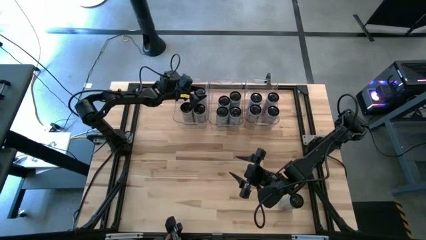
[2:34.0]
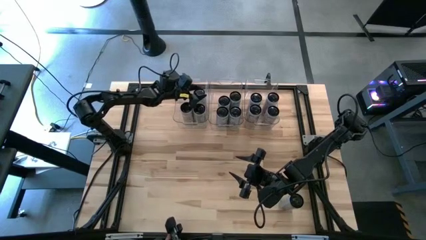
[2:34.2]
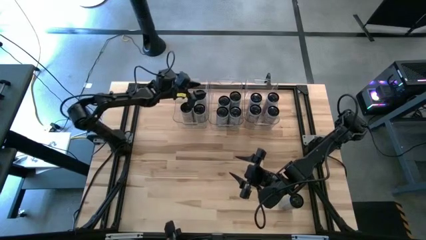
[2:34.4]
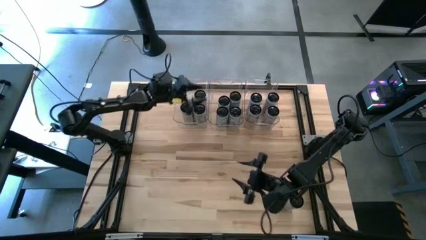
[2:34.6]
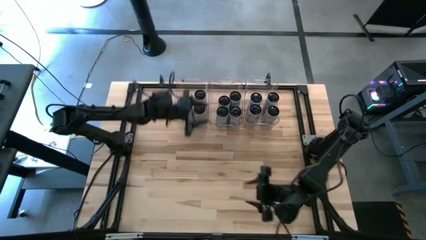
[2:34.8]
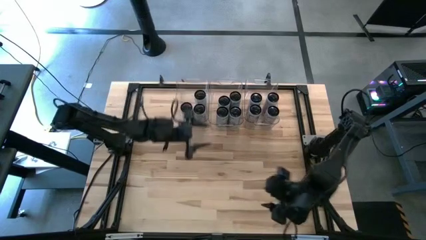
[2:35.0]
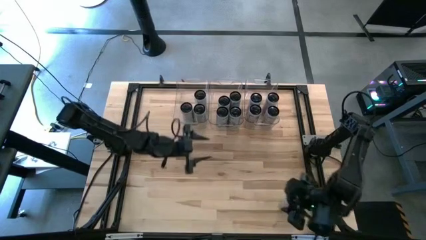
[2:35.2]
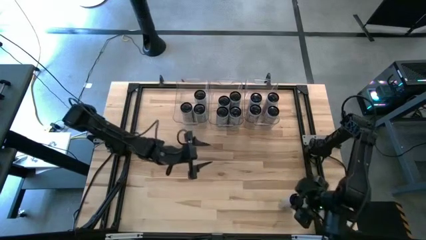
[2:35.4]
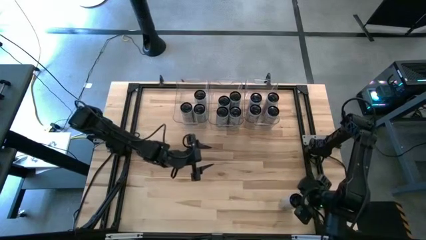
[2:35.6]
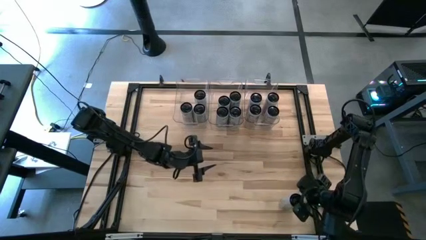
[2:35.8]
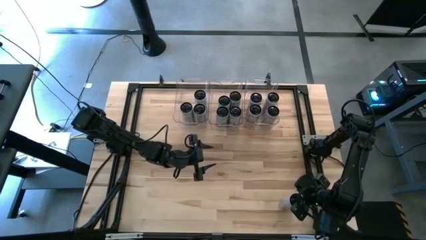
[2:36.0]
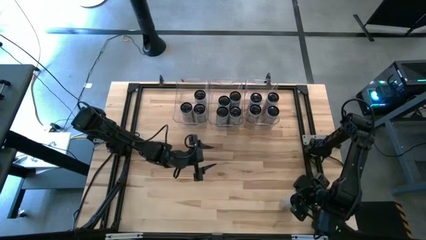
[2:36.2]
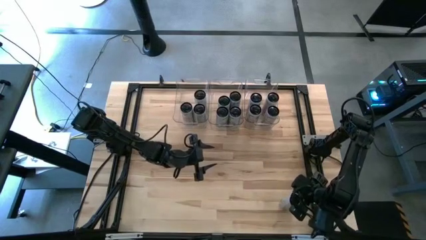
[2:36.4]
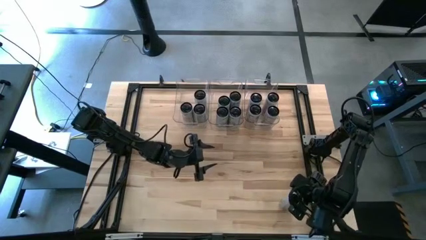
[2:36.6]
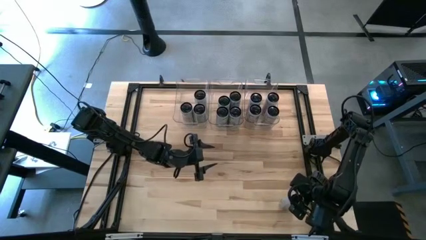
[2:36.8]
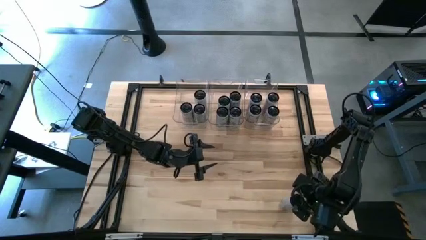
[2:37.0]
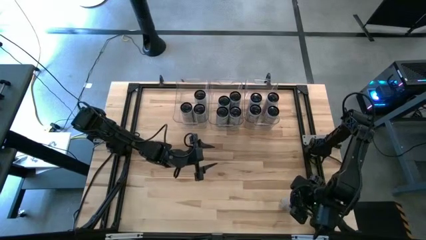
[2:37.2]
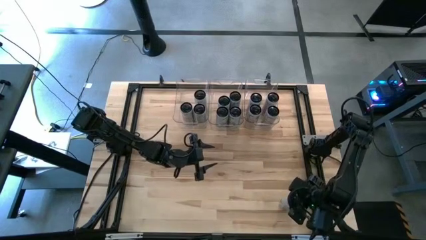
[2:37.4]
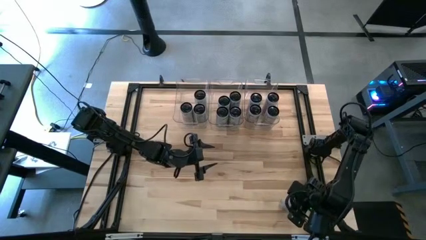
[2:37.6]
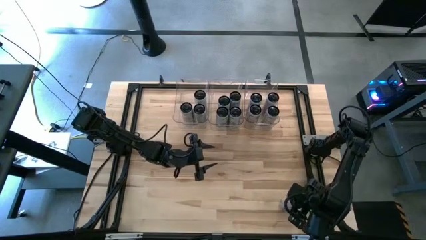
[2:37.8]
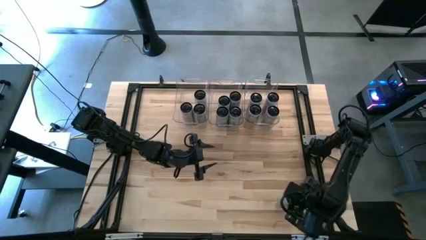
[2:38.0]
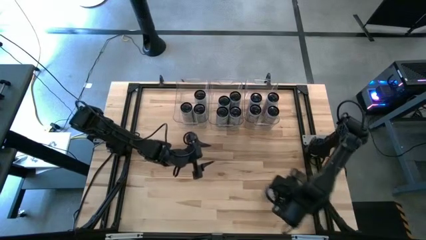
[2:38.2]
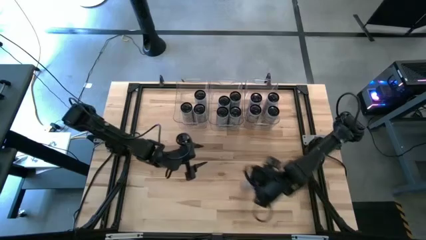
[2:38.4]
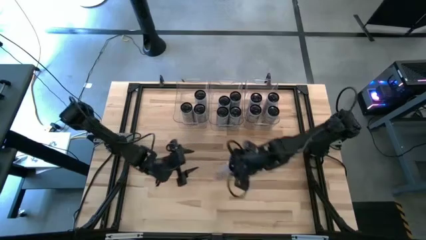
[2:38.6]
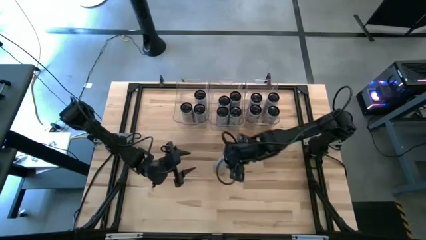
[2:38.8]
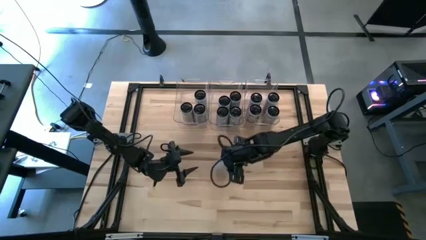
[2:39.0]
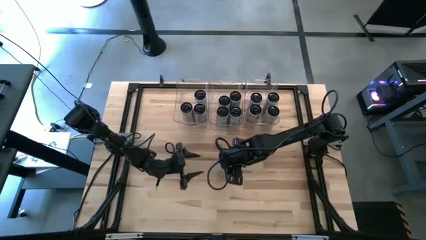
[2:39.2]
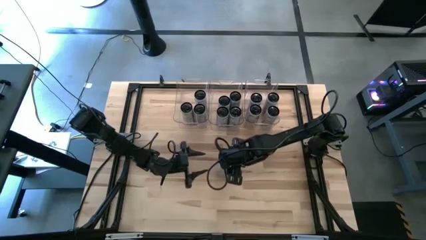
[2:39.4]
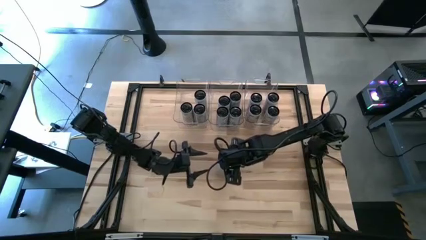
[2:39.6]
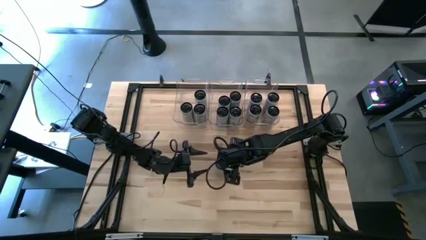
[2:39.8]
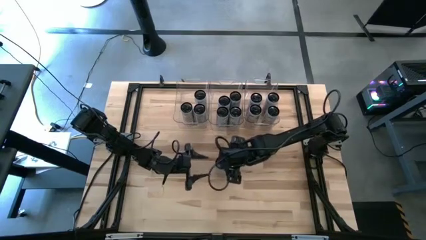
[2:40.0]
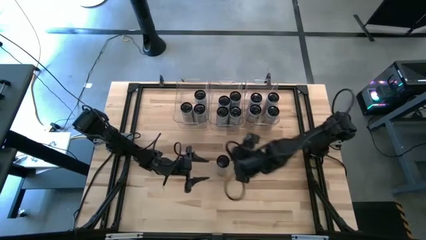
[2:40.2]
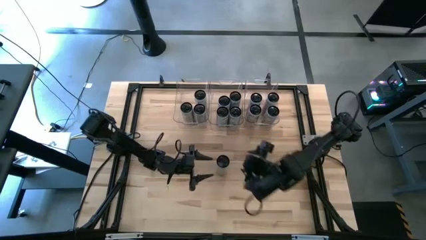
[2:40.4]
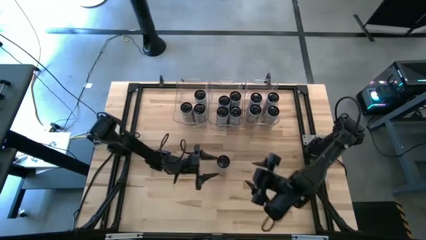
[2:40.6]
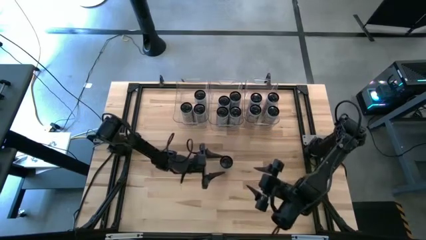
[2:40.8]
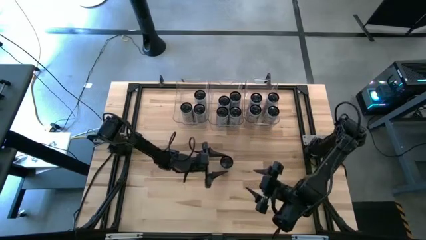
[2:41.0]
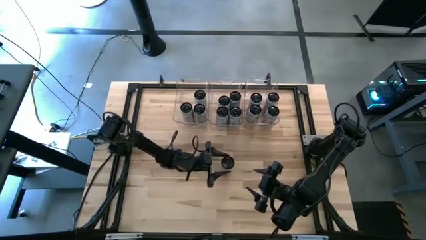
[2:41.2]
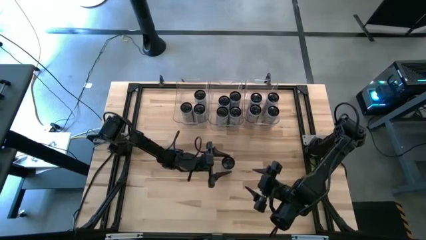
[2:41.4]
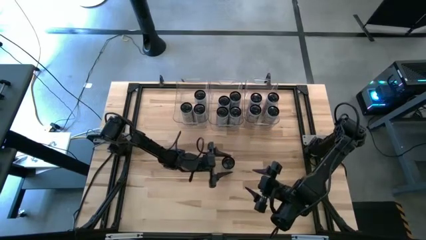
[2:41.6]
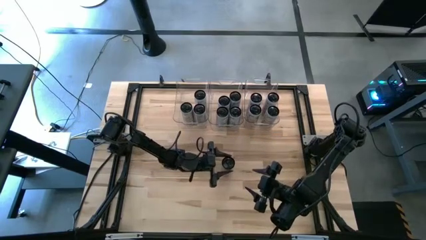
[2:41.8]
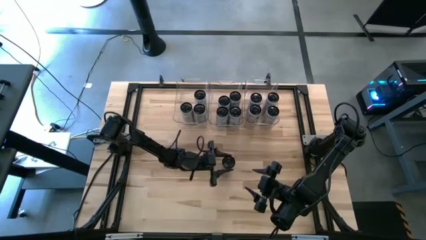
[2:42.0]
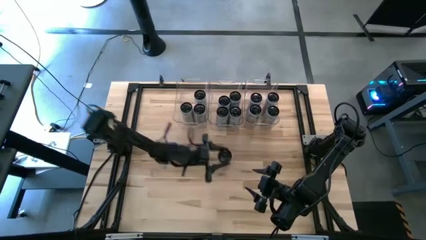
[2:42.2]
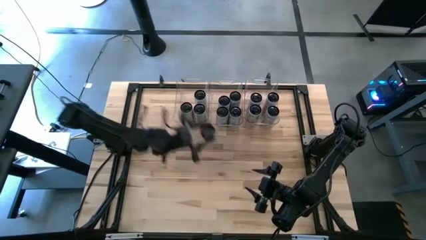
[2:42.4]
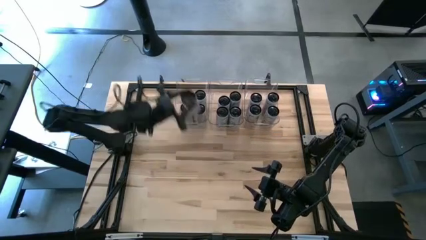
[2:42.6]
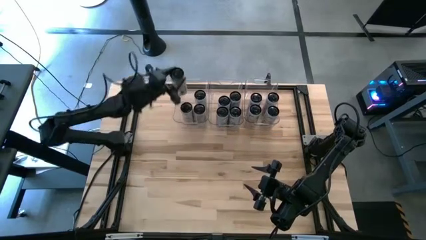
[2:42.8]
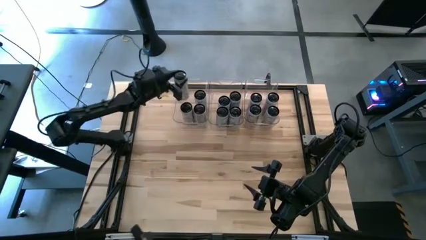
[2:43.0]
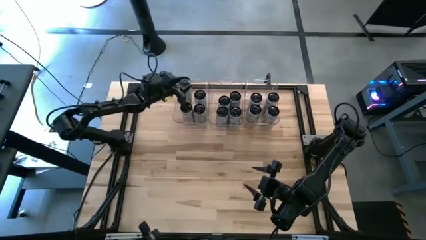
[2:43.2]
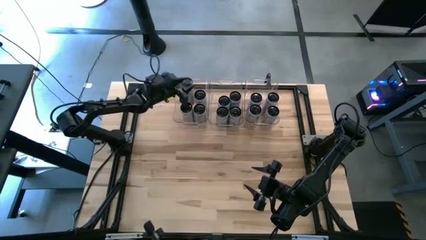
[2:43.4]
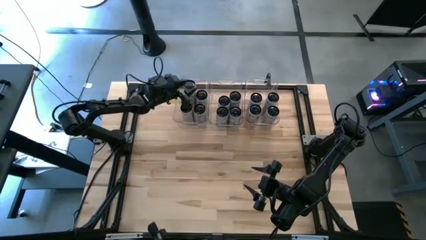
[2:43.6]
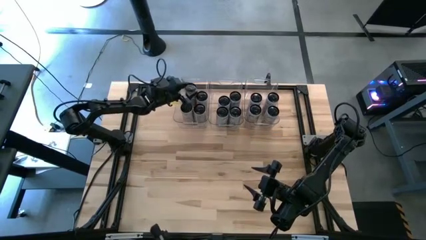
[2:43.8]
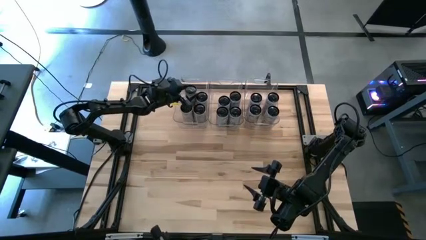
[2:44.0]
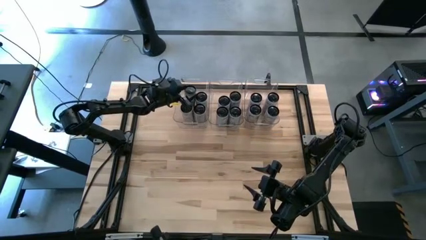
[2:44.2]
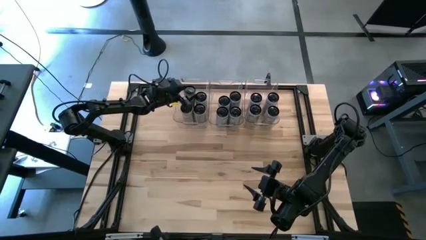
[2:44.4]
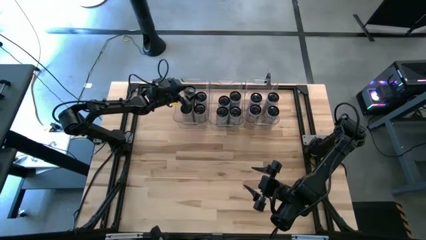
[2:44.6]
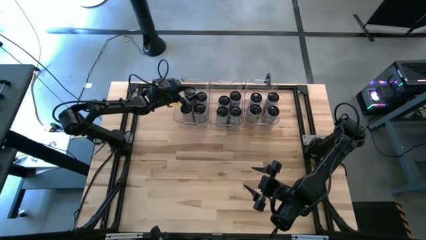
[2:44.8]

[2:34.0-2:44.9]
Task: Sort soda cans
Put the white-yellow soda can into the left transparent bin

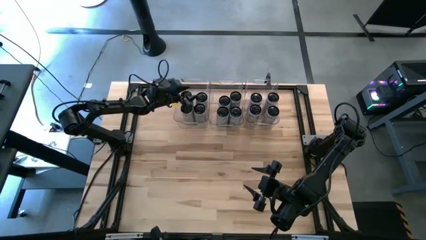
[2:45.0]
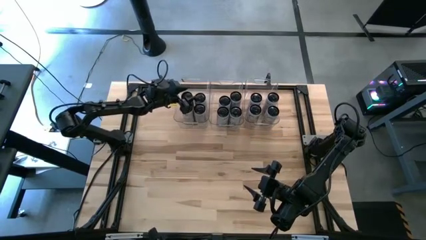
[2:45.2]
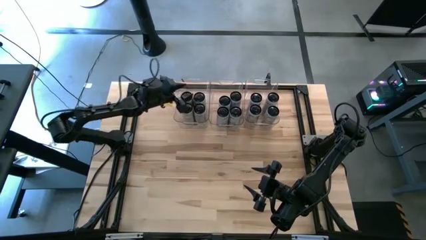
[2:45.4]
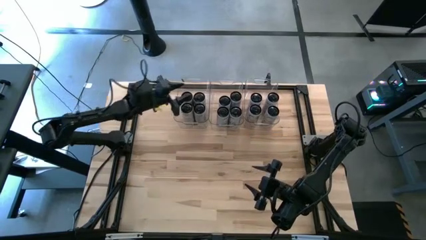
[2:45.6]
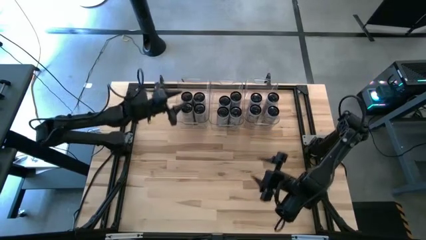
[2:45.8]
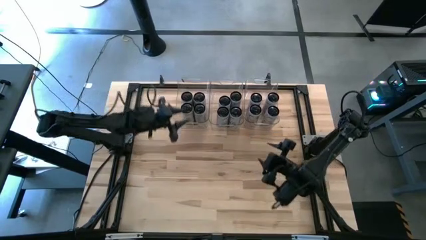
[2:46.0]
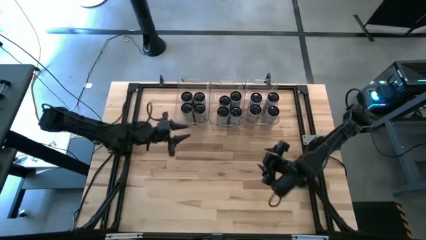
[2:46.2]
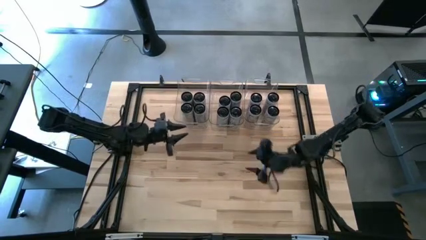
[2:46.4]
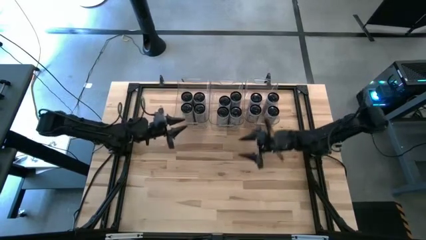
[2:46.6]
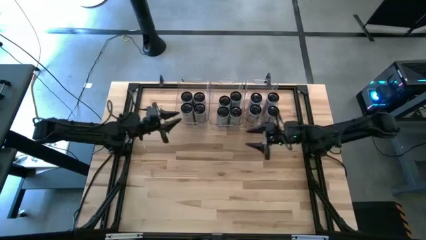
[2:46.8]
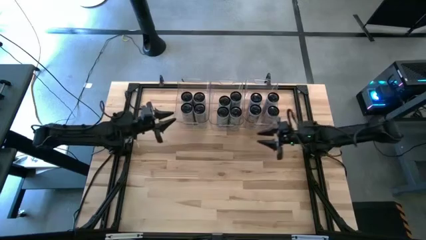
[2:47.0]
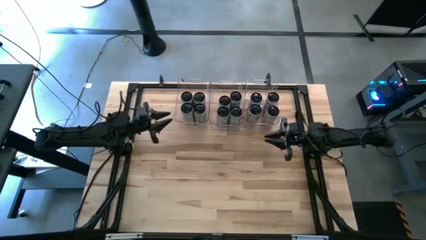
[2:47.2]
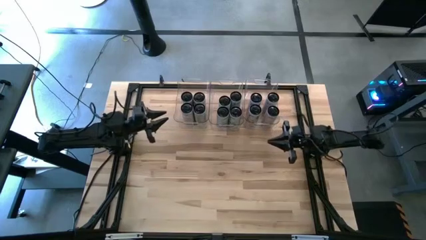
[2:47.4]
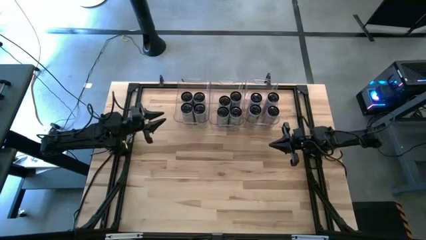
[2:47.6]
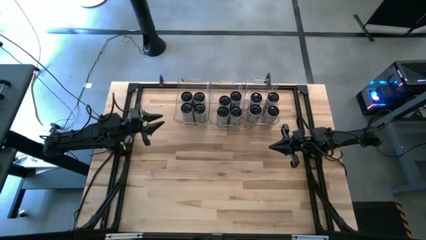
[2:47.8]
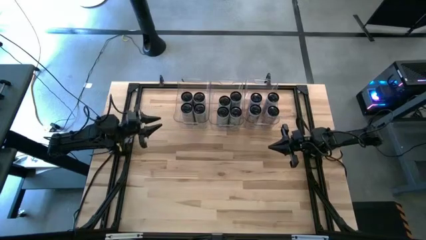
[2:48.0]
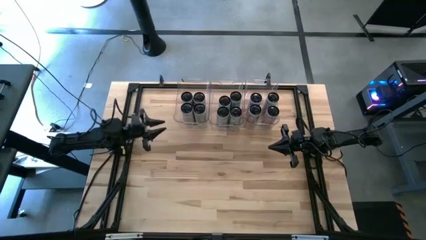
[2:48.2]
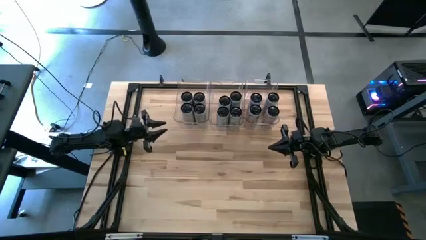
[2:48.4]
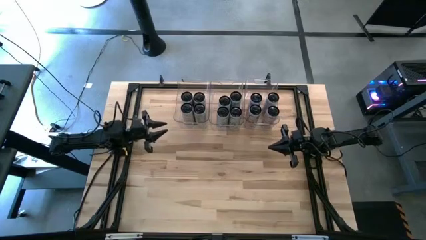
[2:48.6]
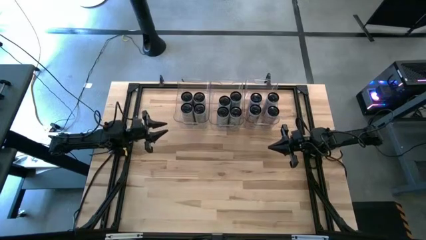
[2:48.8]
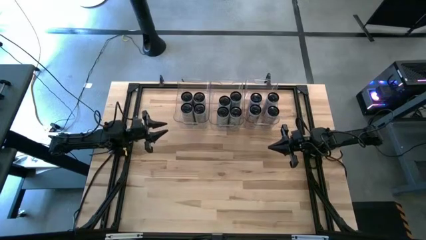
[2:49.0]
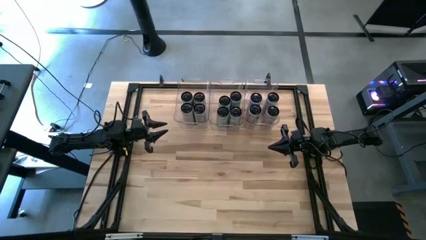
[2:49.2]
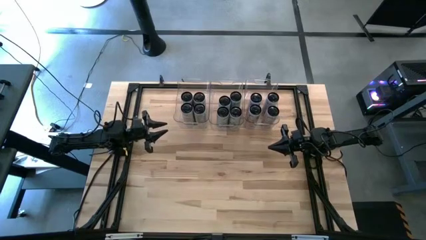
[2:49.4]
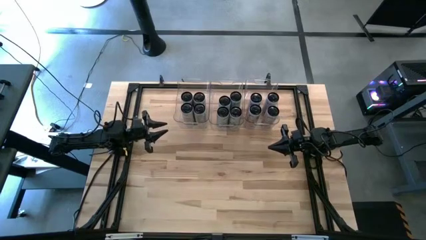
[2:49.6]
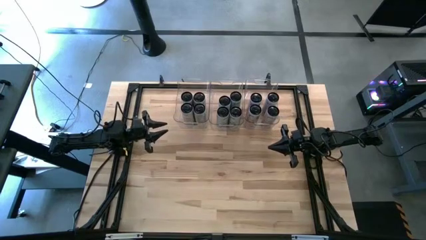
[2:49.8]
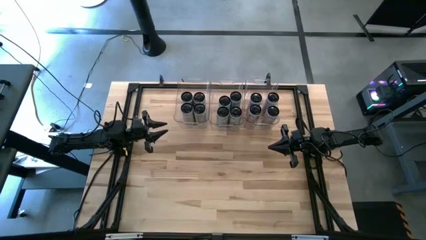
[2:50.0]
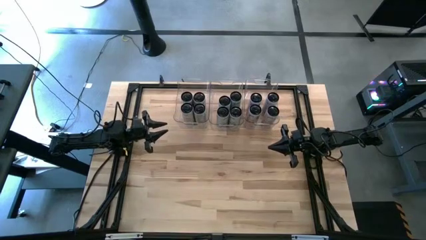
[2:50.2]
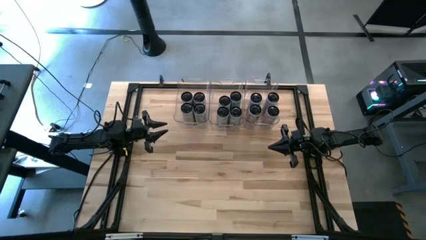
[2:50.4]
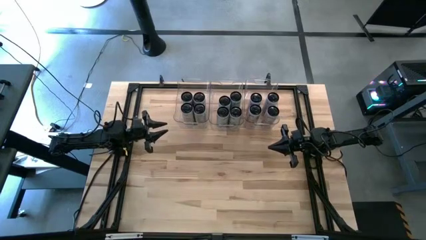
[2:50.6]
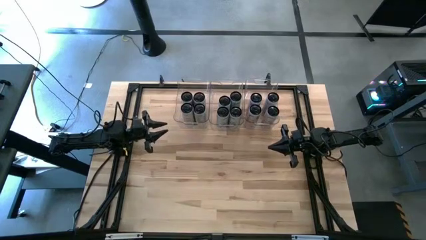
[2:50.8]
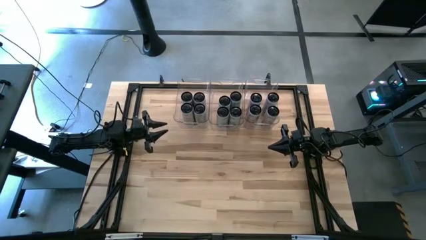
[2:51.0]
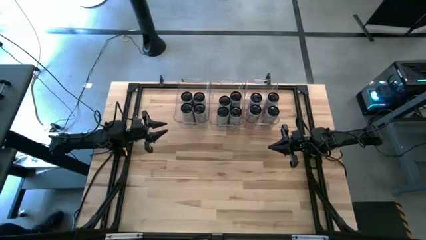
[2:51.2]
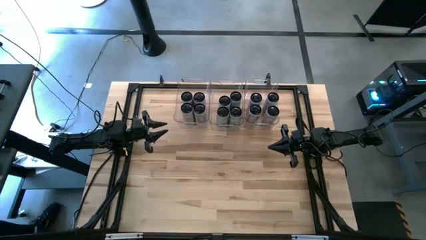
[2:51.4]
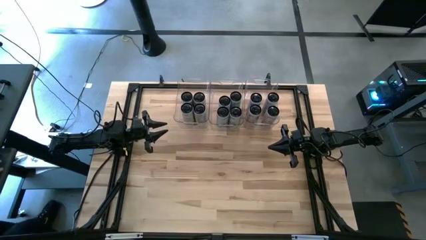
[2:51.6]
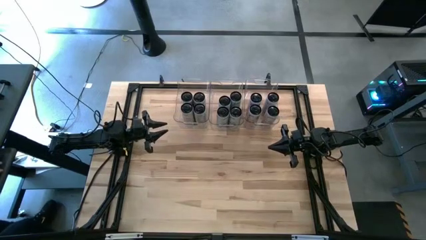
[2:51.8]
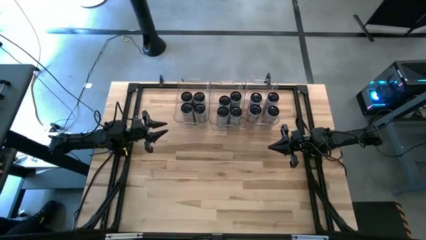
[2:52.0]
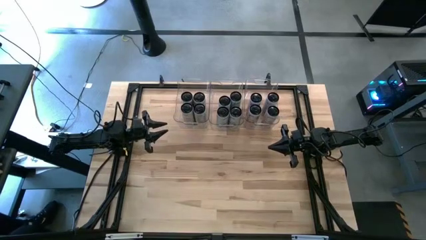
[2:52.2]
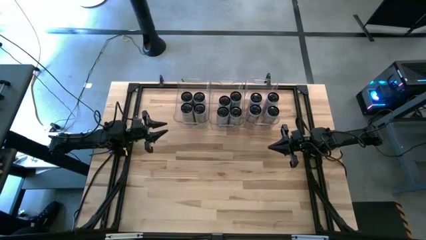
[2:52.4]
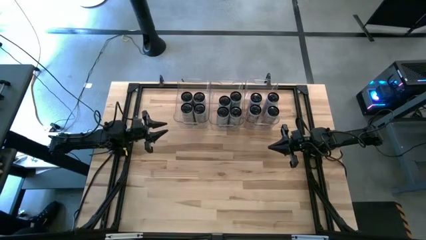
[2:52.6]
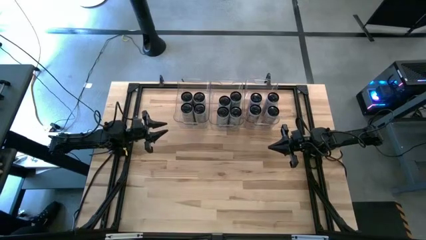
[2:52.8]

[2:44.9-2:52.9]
Return to Home Position
